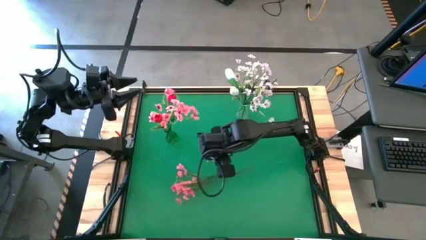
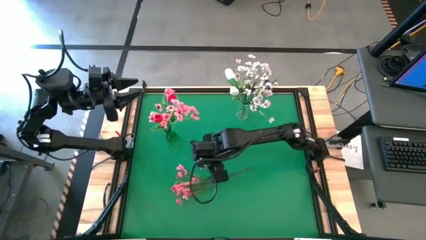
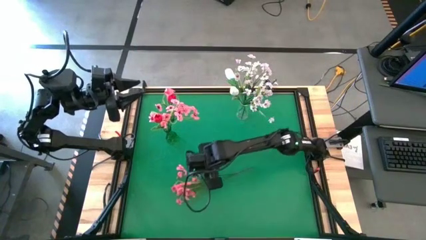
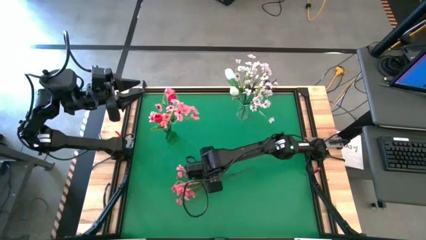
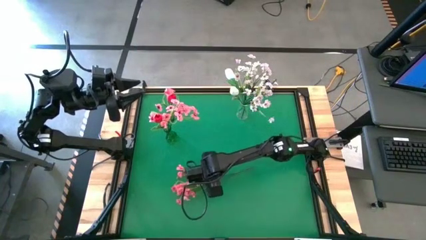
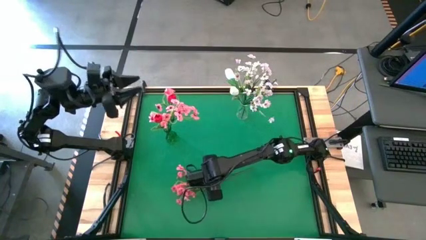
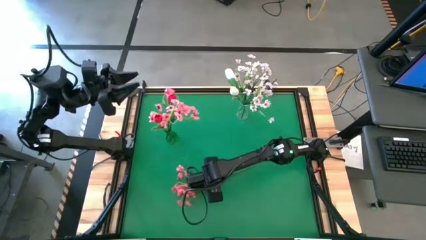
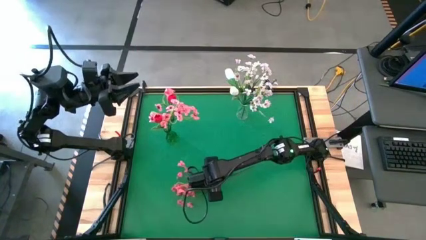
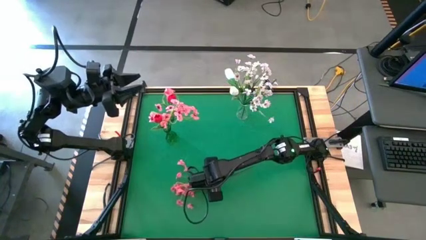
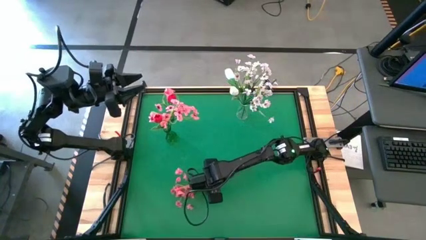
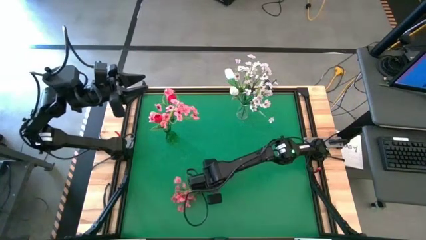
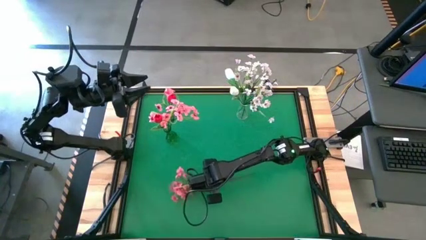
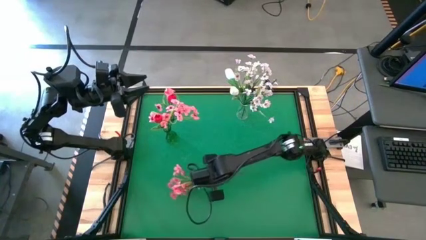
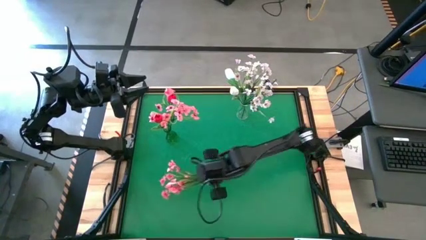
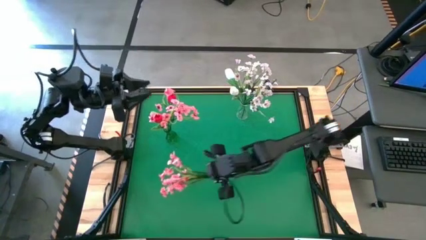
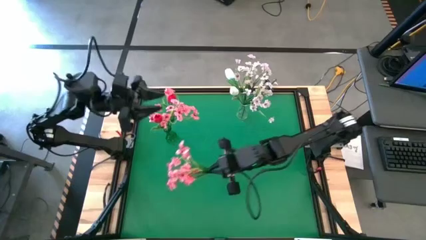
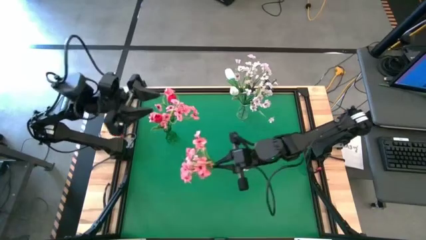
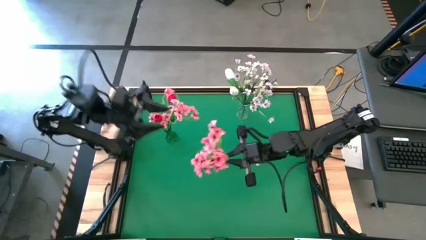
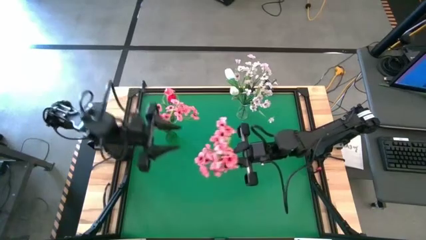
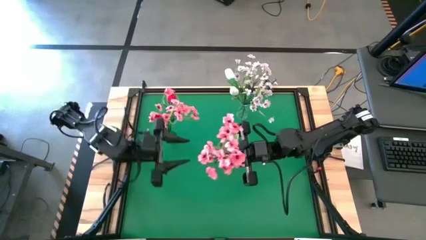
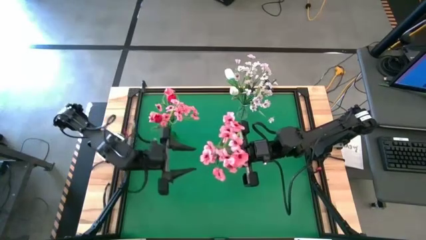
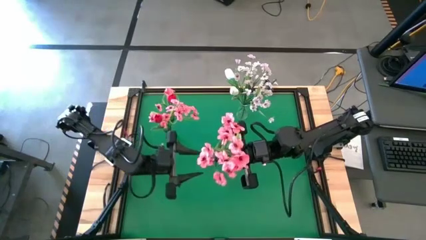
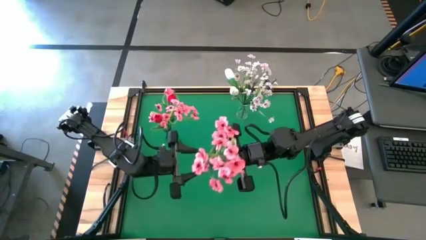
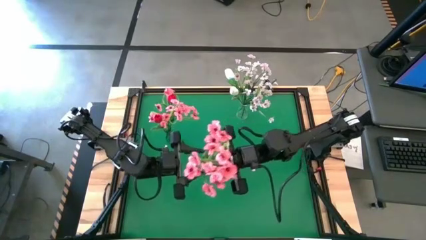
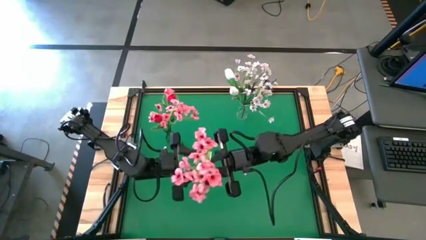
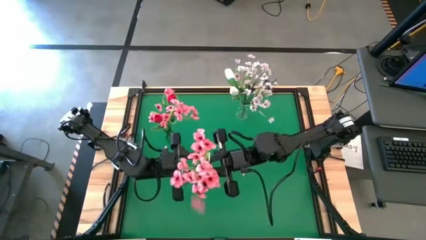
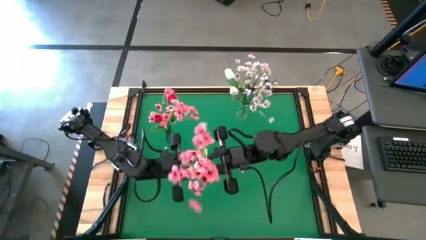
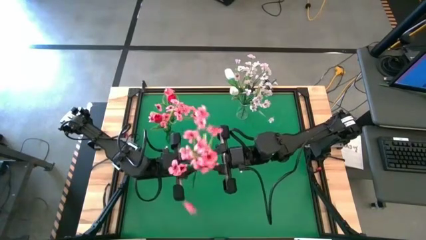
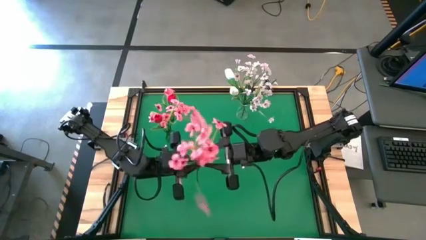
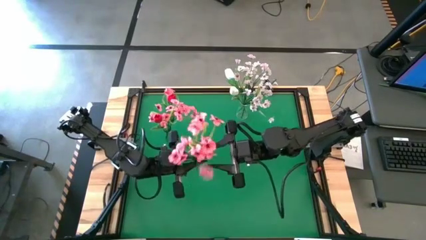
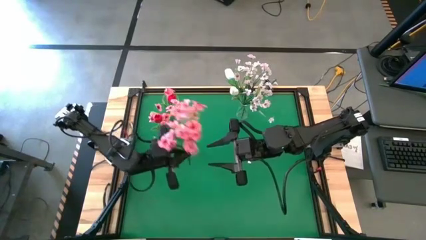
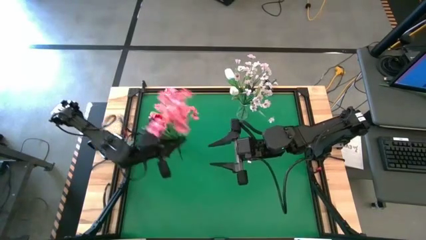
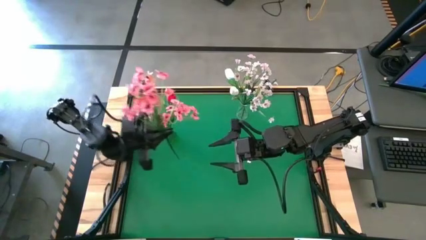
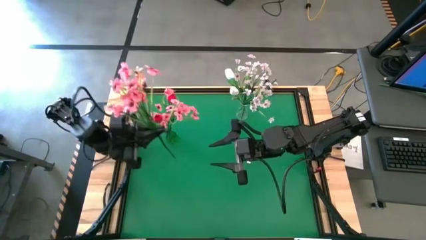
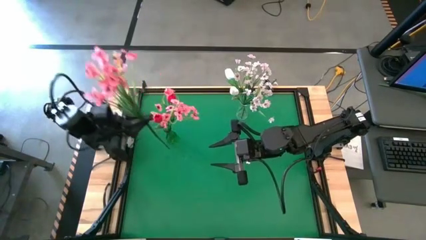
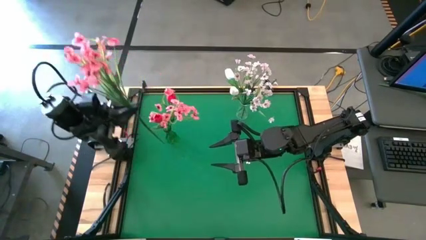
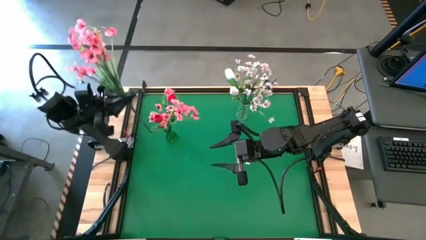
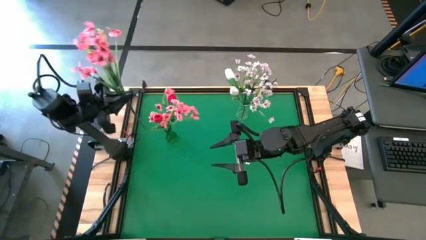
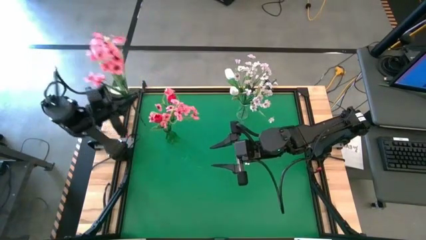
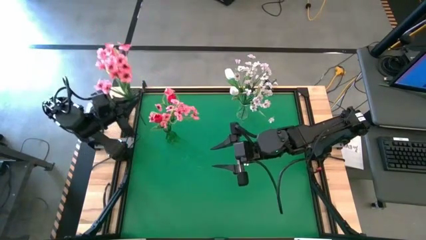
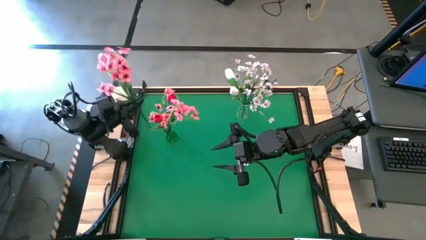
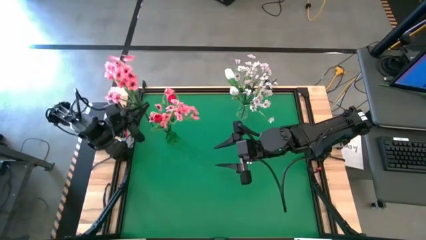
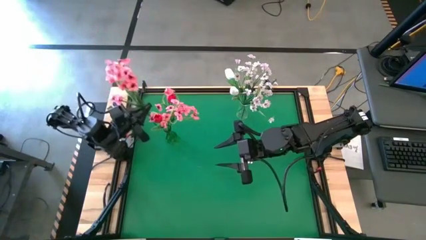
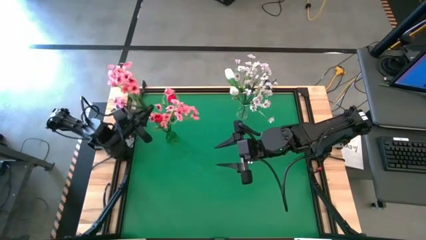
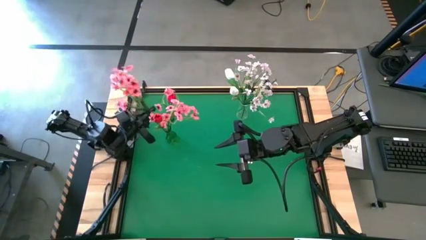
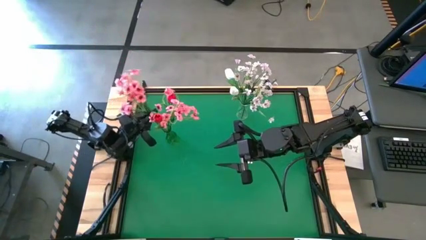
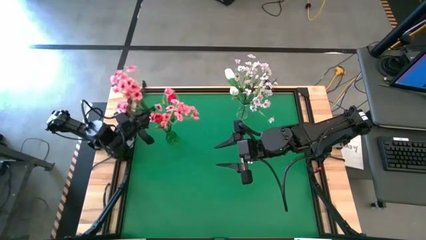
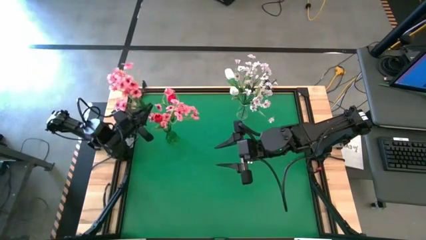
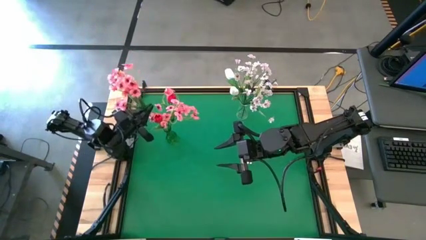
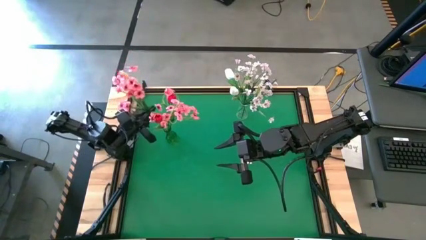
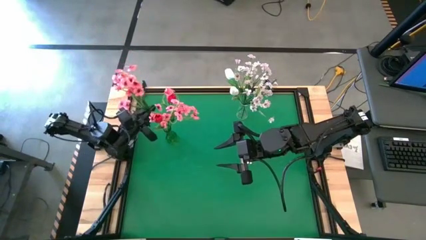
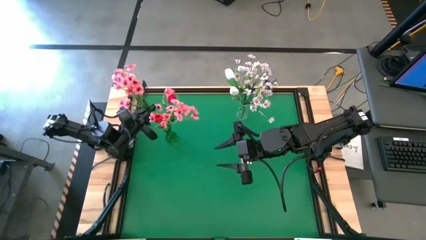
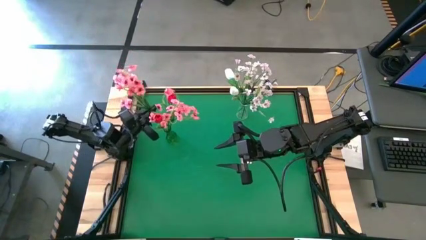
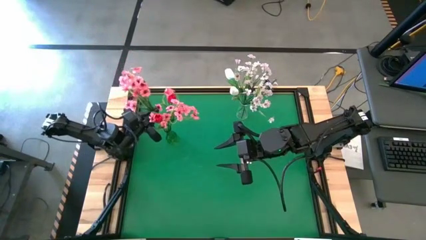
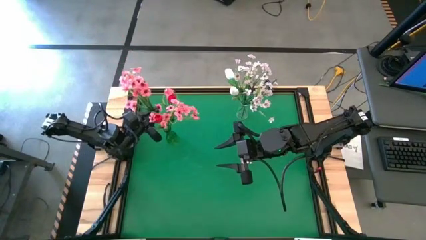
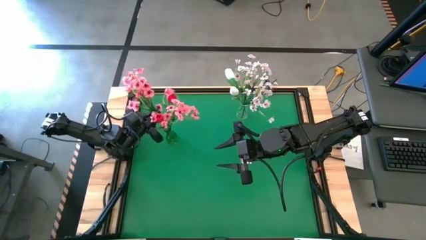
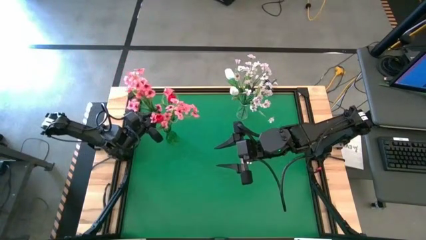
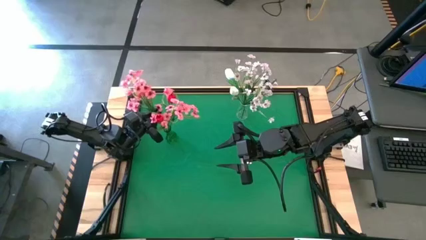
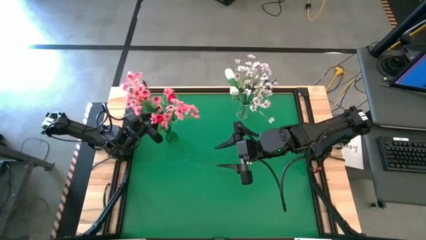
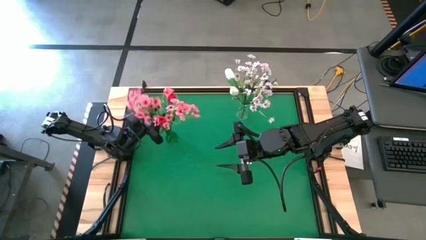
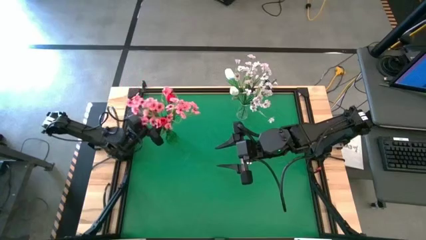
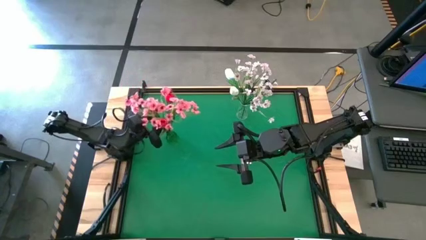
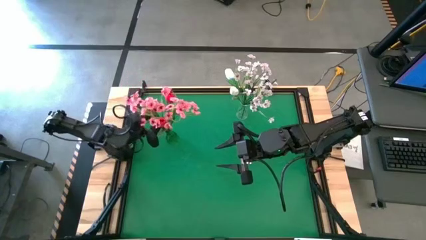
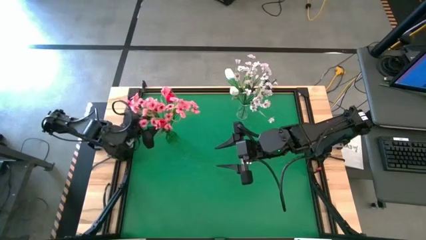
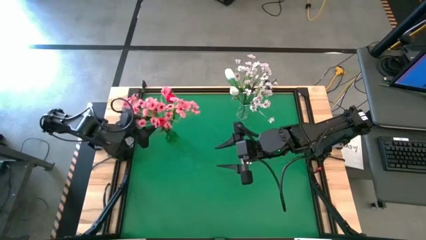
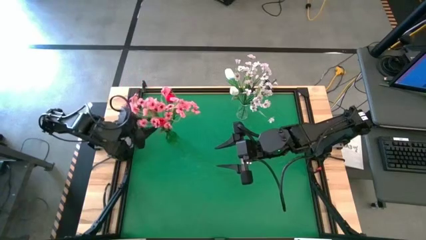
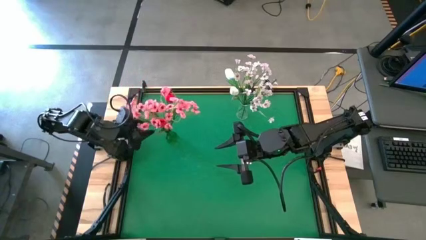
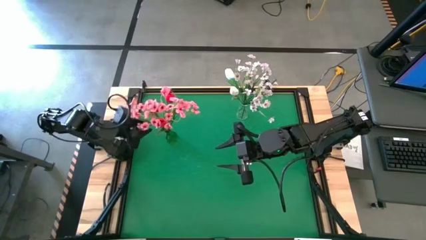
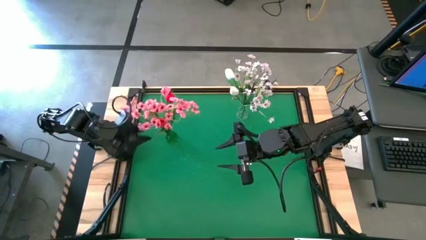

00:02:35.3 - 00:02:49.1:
Task: Sort flowers into vase by color
Put the pink flowers into the green vase
